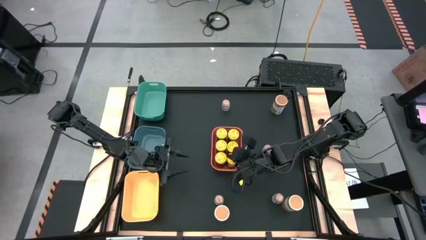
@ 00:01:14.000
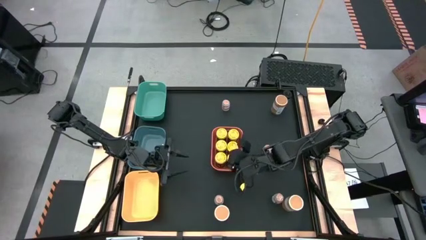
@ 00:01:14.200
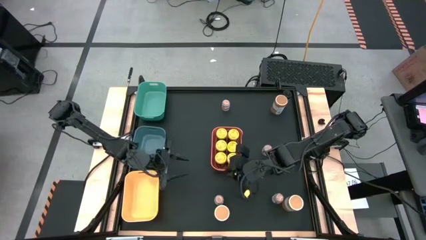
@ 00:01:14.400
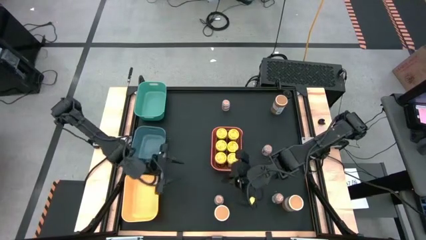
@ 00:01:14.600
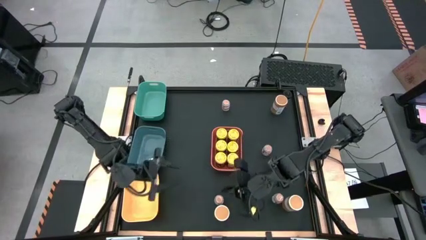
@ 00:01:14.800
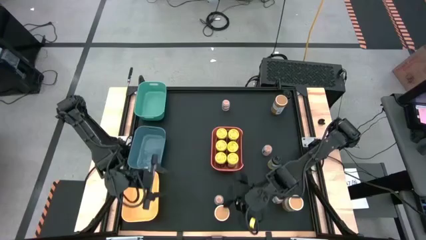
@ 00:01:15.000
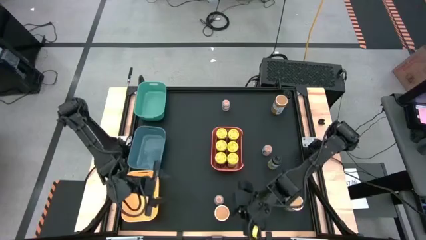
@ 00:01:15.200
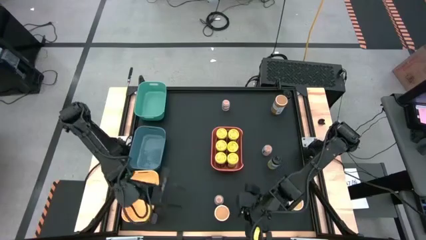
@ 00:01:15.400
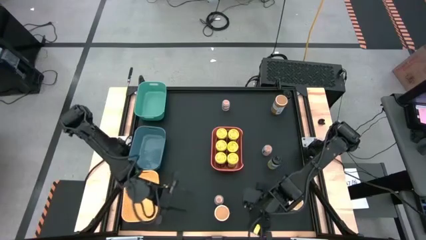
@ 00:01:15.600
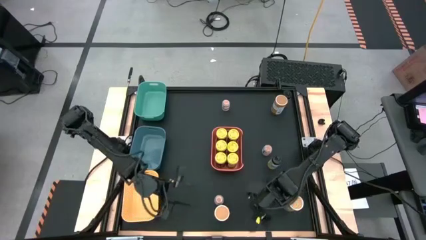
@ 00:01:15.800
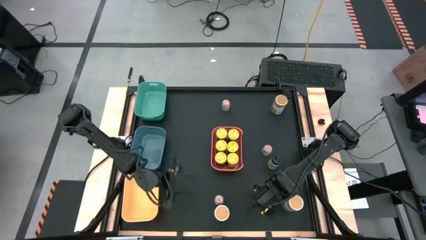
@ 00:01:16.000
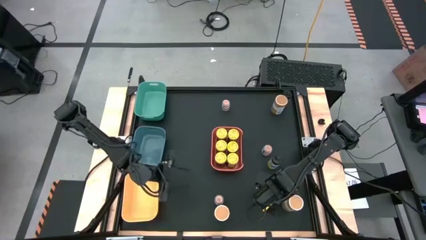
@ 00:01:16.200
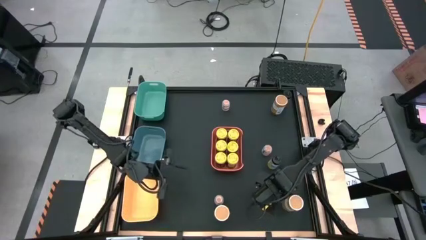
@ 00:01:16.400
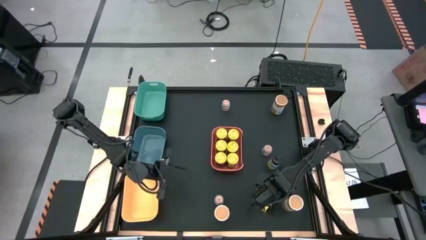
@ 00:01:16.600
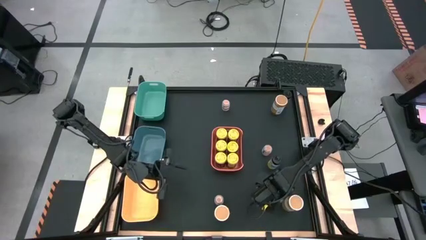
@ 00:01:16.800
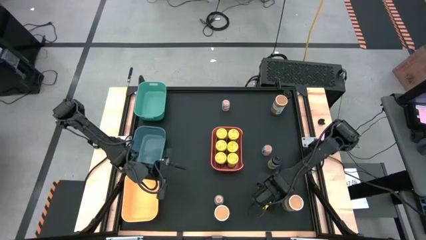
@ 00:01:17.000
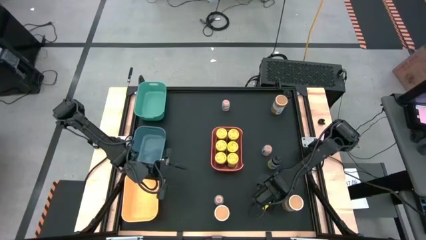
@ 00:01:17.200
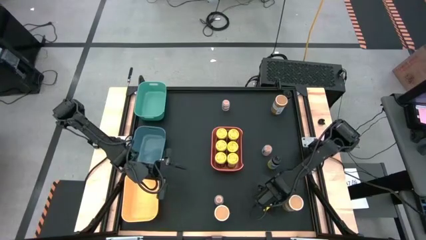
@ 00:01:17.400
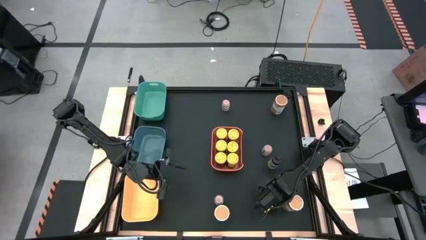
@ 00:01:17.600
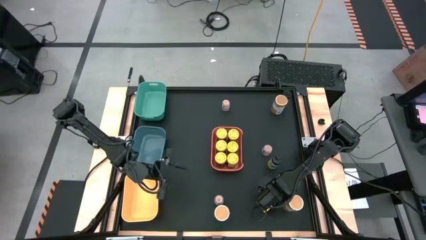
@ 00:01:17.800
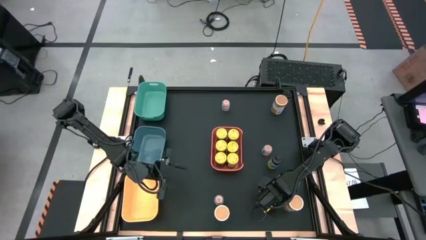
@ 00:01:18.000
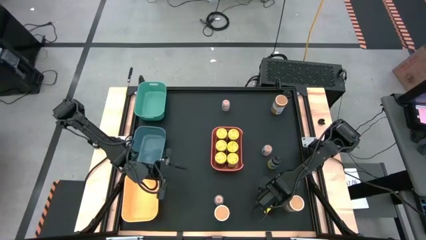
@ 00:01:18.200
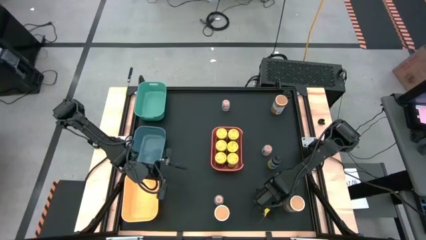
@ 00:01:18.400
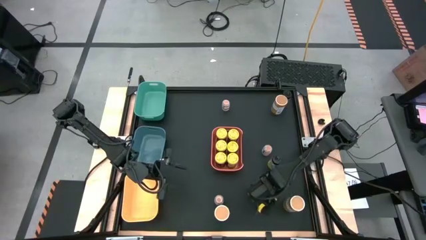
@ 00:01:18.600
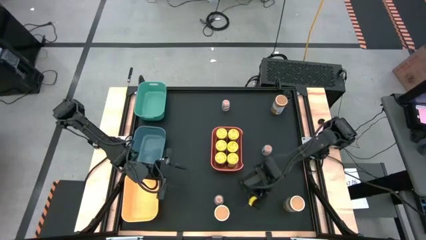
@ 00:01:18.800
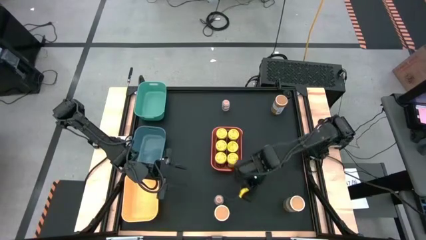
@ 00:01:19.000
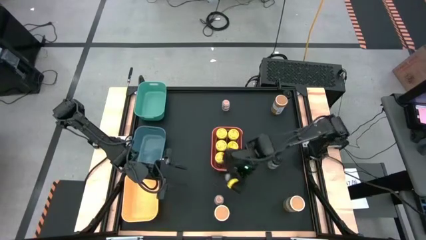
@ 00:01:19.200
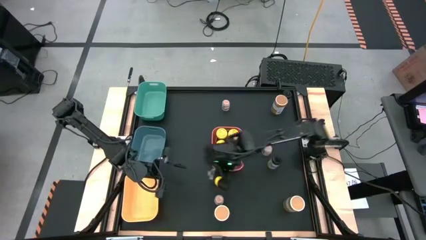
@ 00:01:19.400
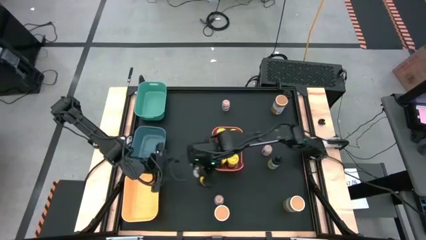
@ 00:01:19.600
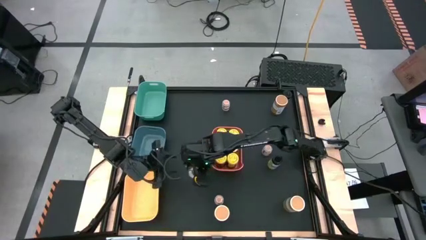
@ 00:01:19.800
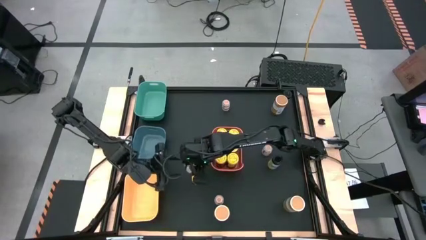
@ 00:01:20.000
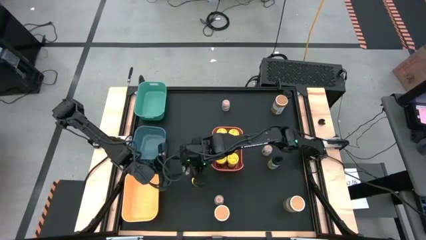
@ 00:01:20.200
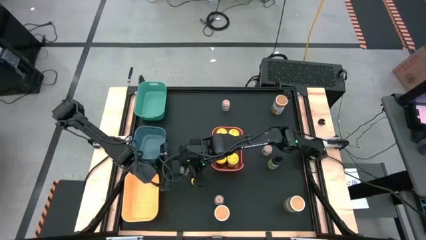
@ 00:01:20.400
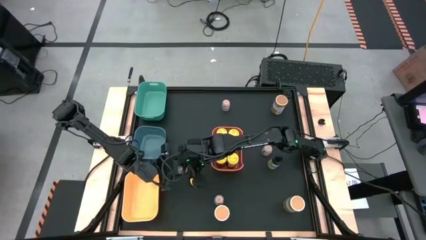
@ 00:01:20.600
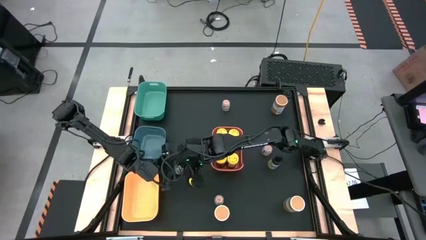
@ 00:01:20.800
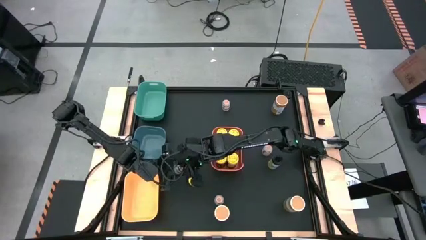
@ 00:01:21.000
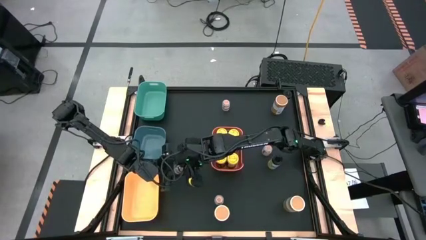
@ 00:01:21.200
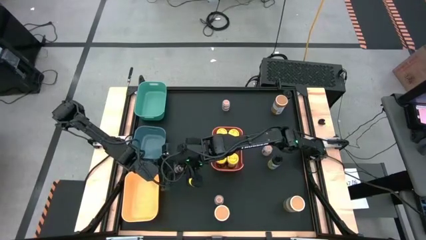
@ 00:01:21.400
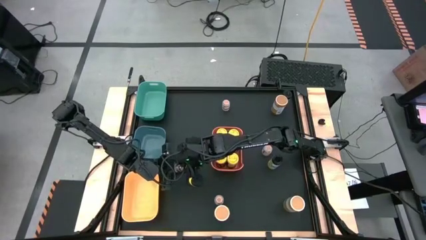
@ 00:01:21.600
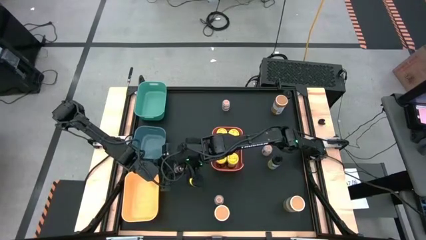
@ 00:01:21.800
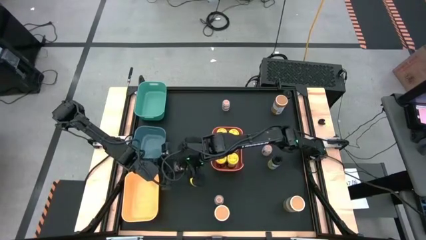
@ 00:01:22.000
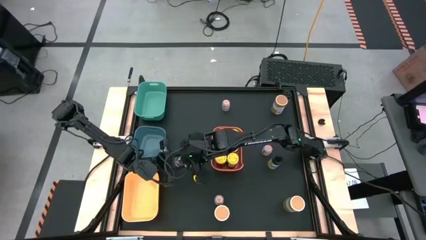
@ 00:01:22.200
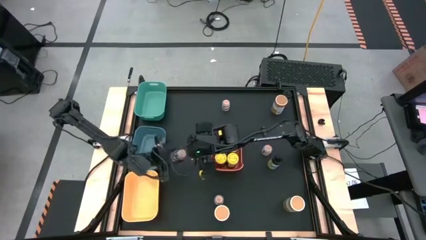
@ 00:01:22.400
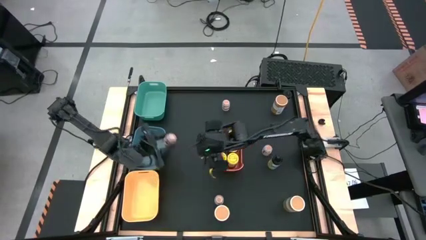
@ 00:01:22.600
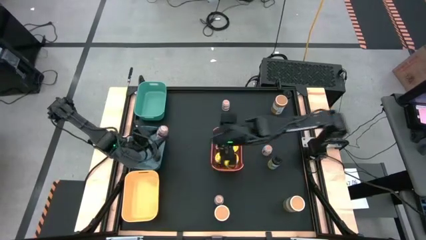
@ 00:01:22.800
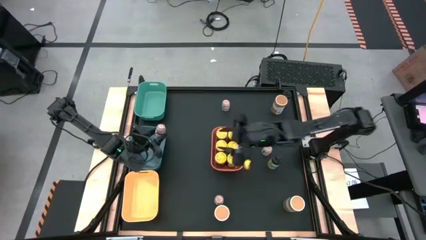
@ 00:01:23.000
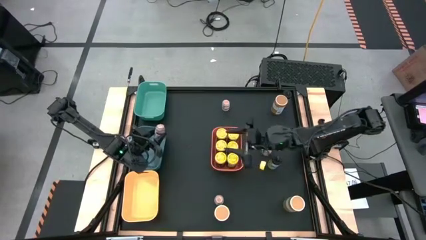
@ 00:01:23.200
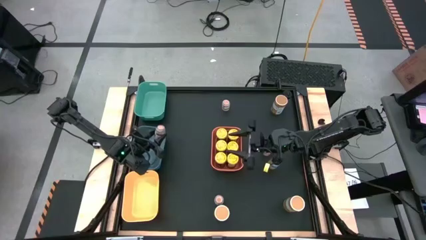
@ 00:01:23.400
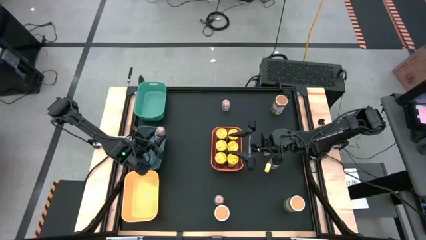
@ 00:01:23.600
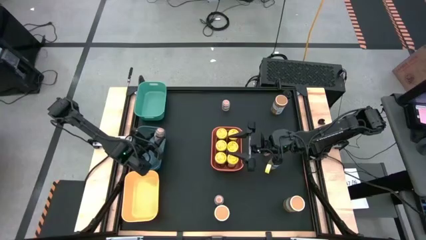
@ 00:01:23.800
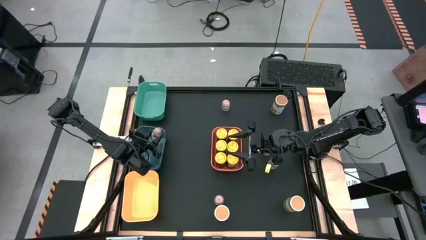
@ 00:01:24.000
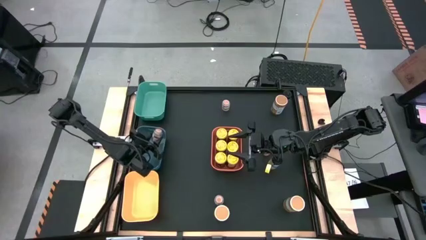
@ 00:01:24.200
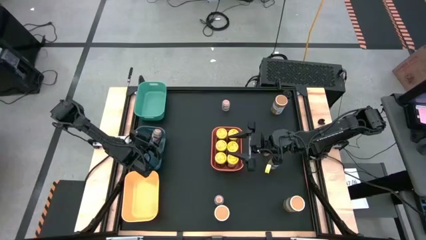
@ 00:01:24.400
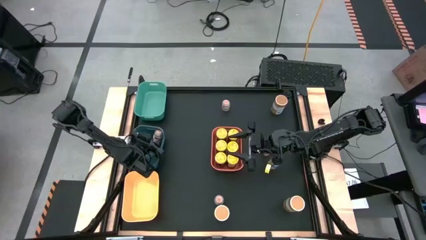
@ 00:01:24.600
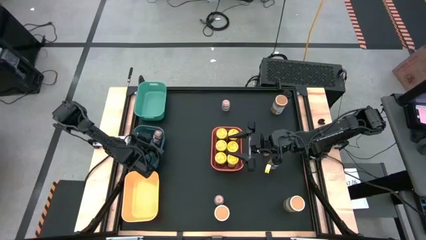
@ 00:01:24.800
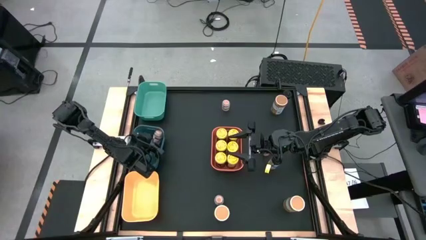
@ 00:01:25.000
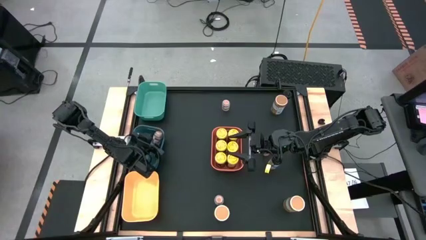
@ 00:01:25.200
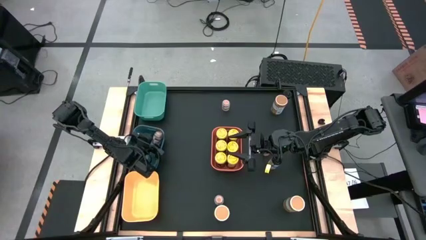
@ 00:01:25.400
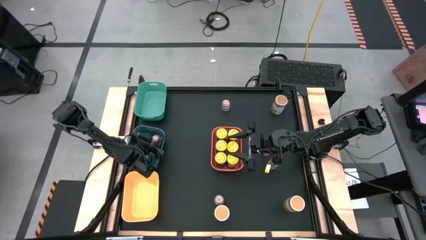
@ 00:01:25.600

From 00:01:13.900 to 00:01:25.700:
Task: Sort spices by type
Put the brown seasoning bottle in the blue bin

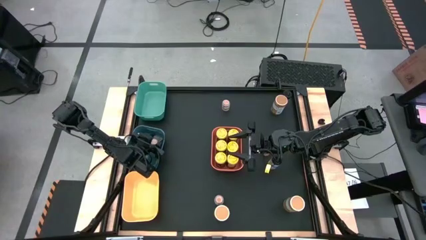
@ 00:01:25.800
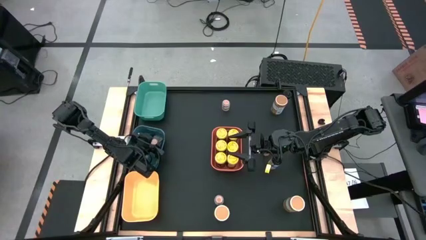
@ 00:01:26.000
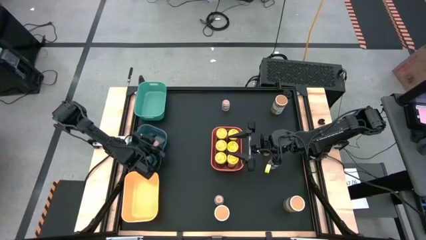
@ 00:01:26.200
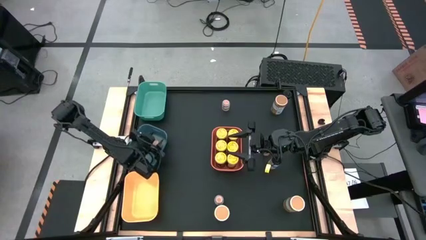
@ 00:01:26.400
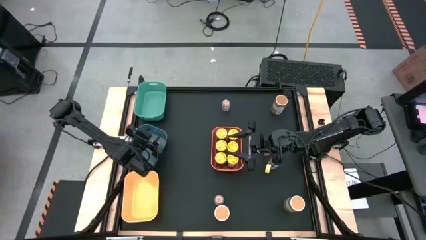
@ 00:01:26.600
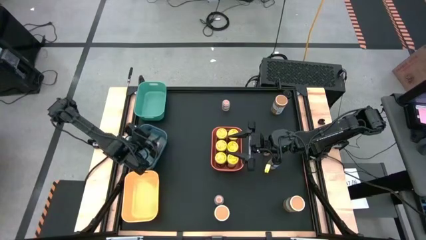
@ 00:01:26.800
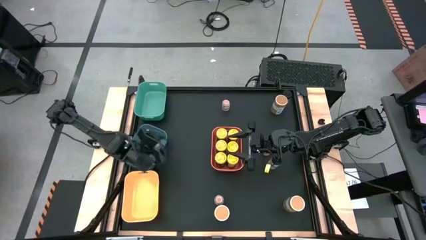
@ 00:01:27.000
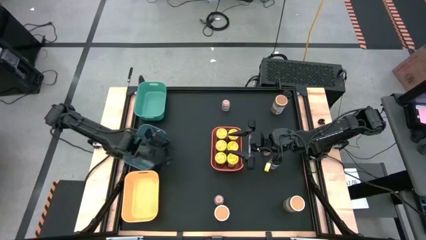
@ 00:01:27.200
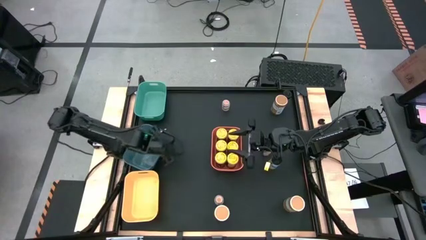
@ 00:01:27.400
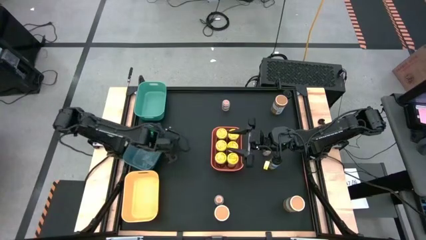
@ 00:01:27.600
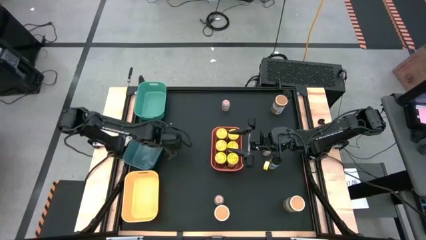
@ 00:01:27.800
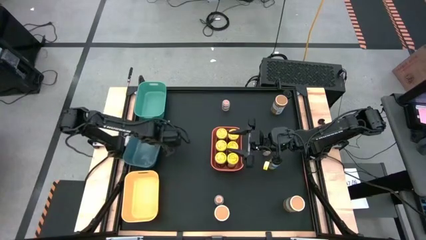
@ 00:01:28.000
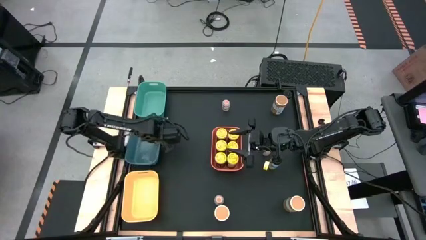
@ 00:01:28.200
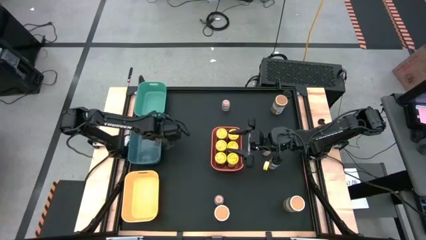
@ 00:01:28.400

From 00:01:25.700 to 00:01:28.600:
Adjust the blue bin
